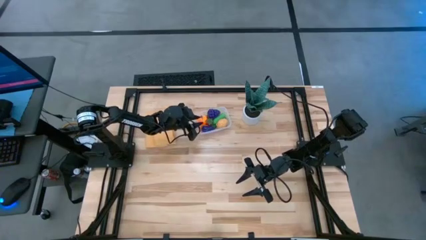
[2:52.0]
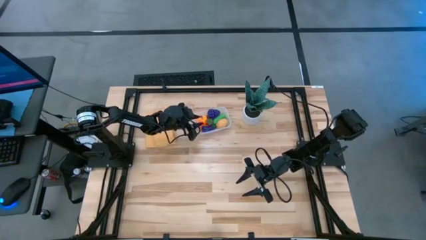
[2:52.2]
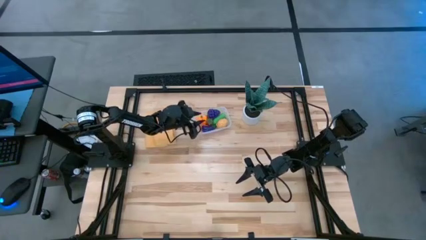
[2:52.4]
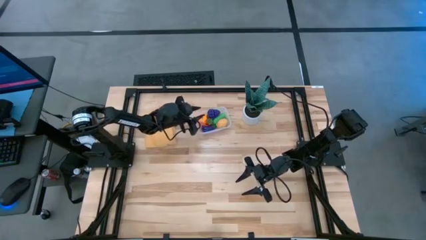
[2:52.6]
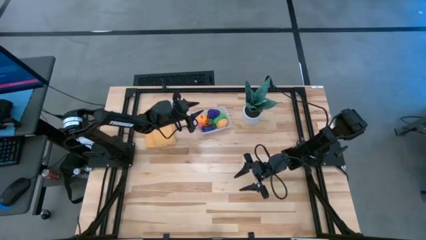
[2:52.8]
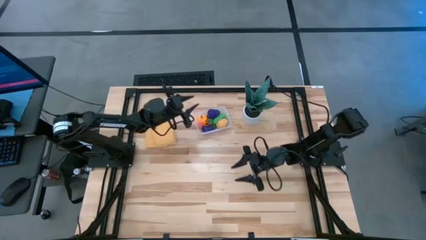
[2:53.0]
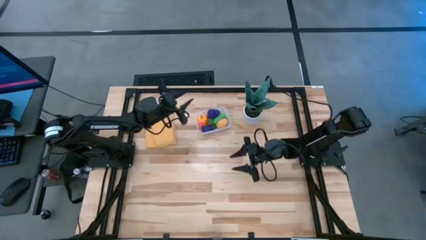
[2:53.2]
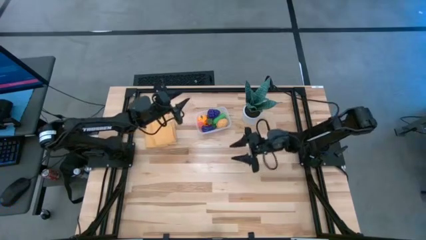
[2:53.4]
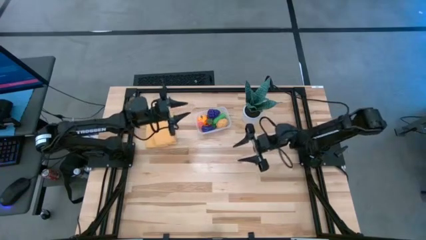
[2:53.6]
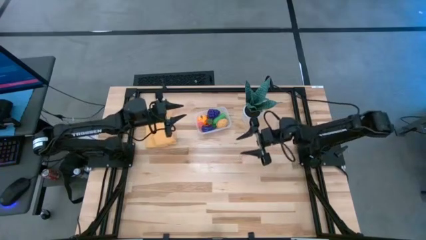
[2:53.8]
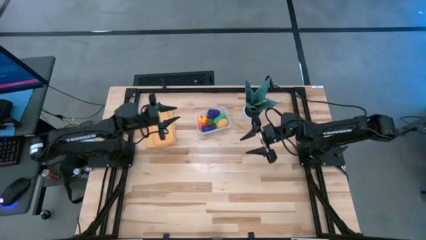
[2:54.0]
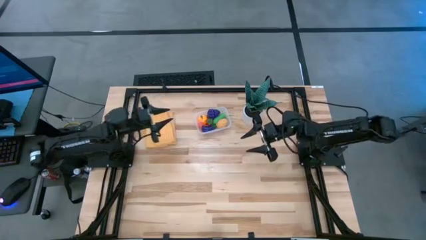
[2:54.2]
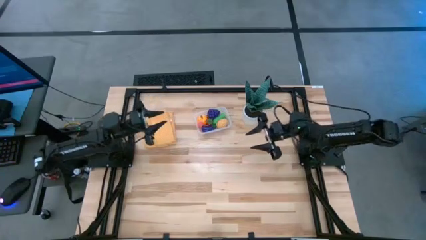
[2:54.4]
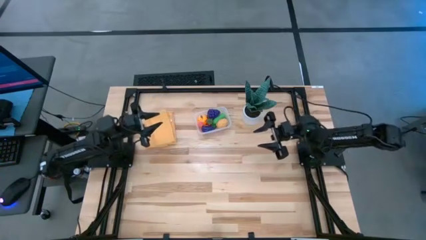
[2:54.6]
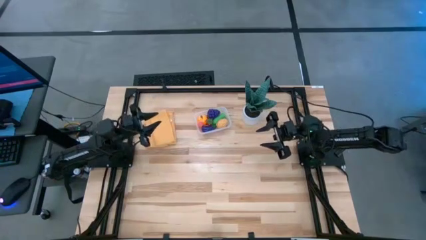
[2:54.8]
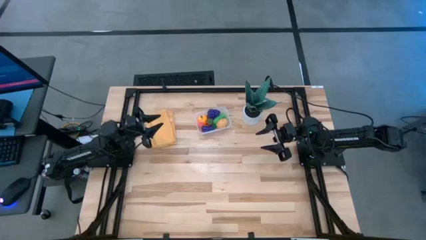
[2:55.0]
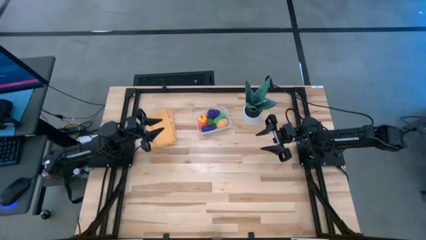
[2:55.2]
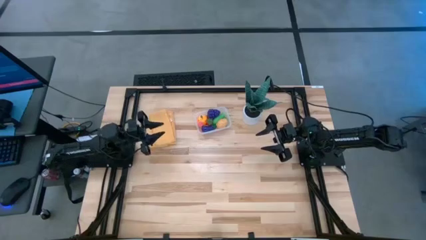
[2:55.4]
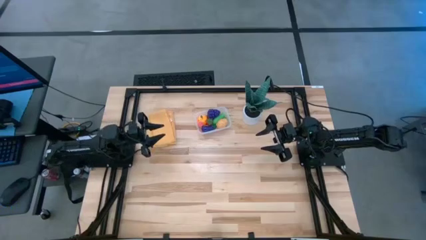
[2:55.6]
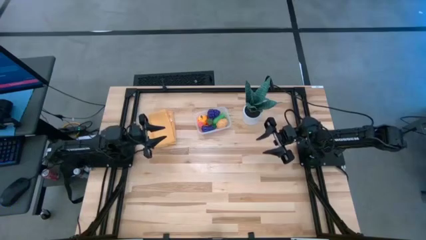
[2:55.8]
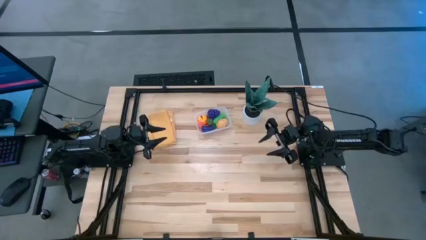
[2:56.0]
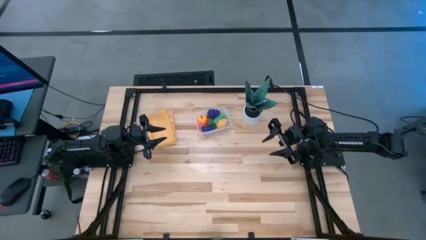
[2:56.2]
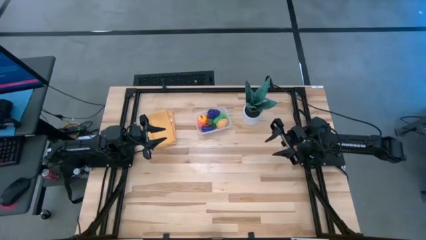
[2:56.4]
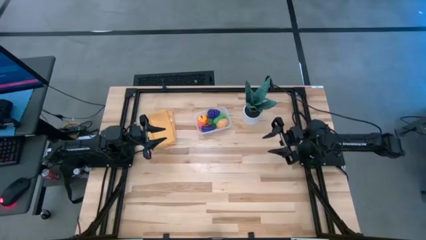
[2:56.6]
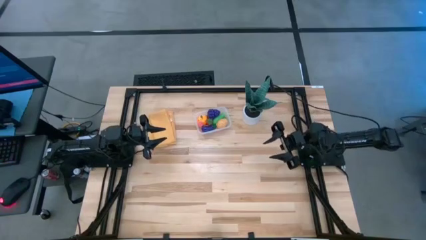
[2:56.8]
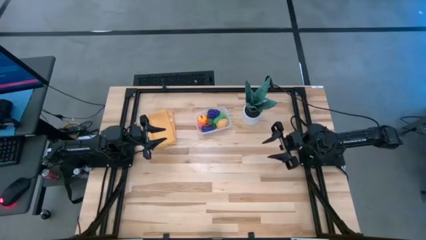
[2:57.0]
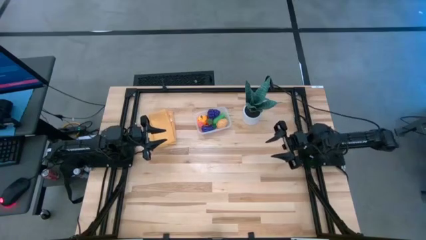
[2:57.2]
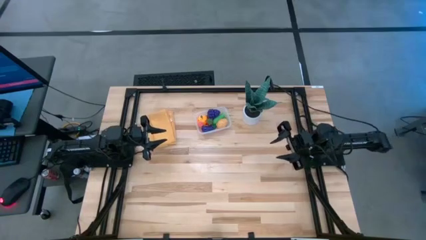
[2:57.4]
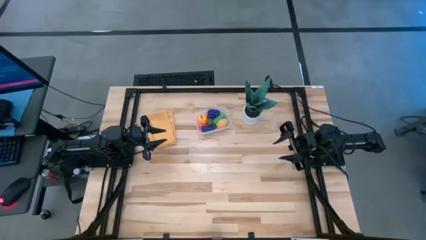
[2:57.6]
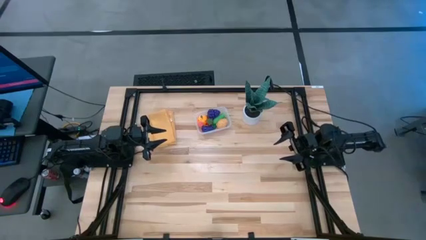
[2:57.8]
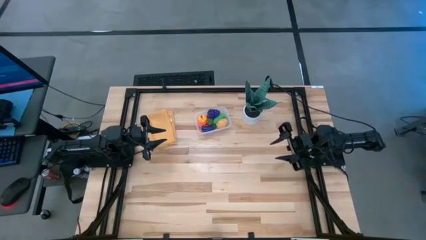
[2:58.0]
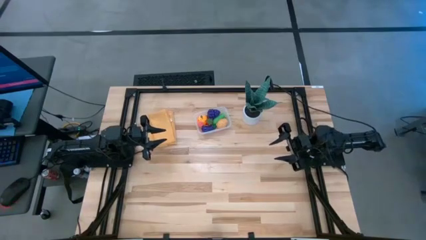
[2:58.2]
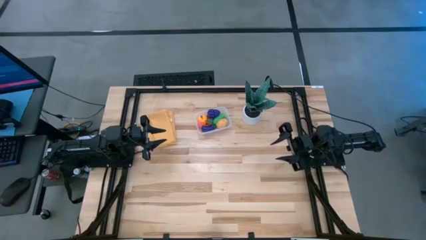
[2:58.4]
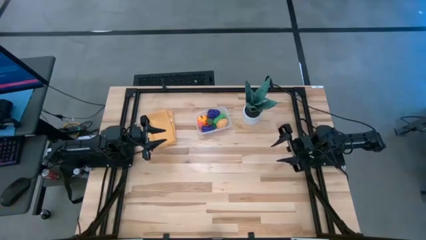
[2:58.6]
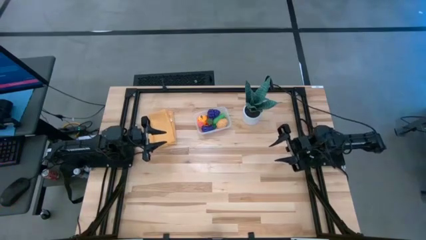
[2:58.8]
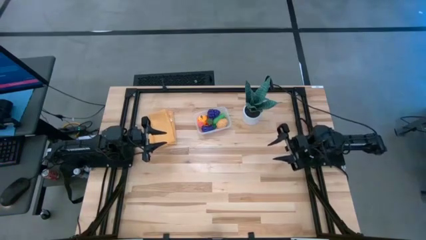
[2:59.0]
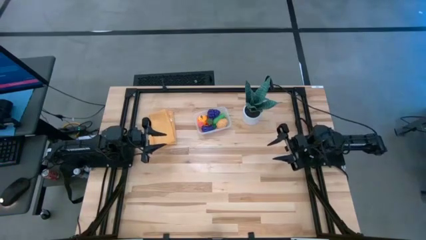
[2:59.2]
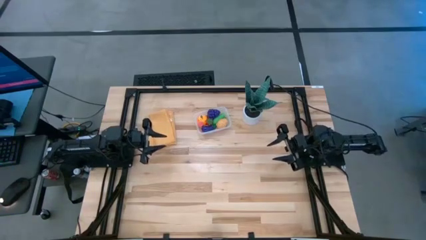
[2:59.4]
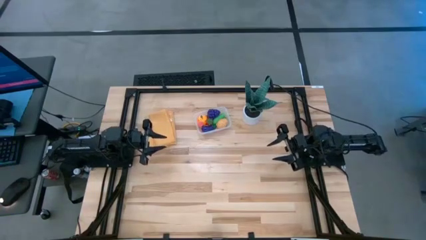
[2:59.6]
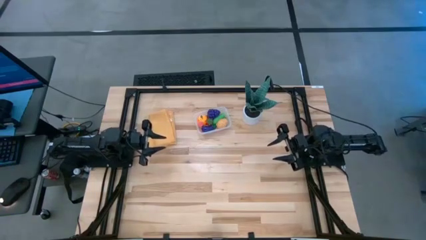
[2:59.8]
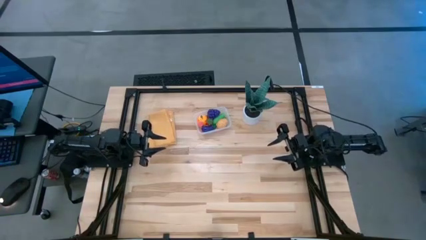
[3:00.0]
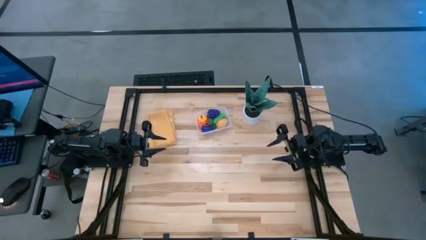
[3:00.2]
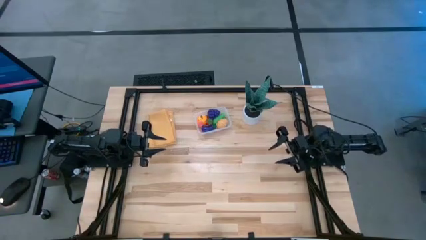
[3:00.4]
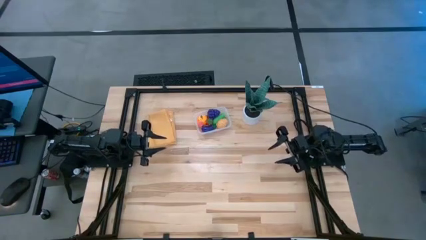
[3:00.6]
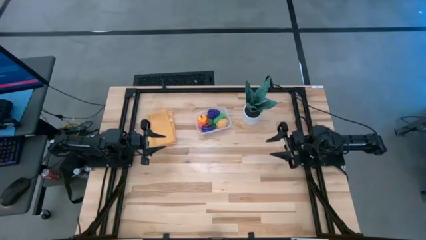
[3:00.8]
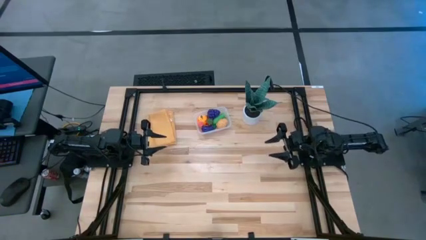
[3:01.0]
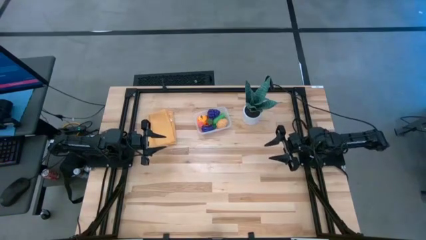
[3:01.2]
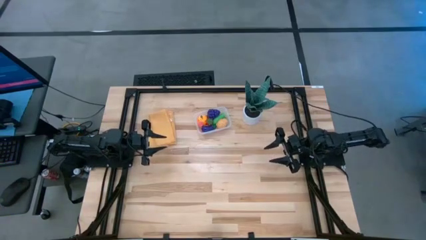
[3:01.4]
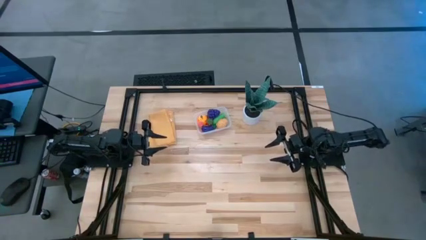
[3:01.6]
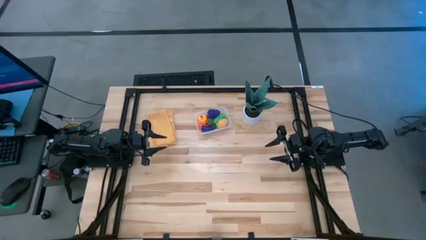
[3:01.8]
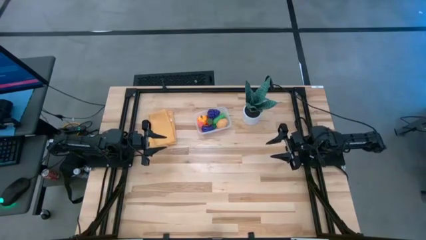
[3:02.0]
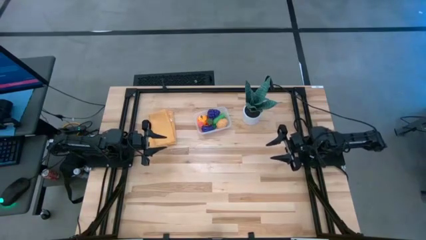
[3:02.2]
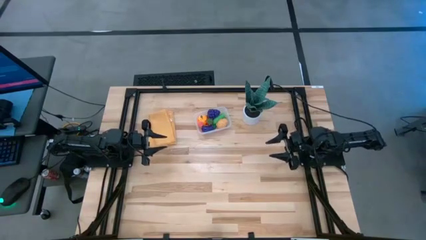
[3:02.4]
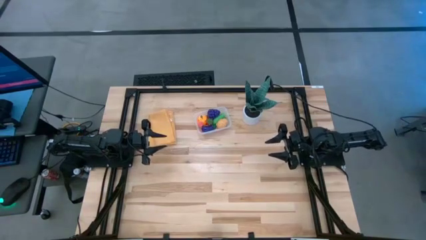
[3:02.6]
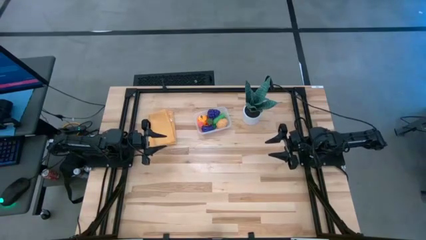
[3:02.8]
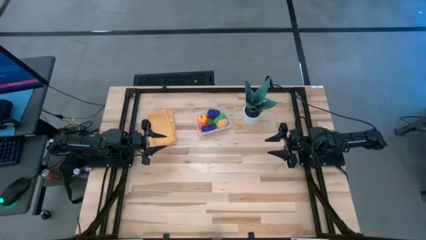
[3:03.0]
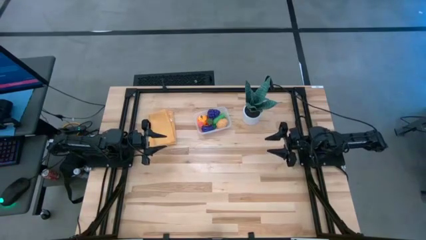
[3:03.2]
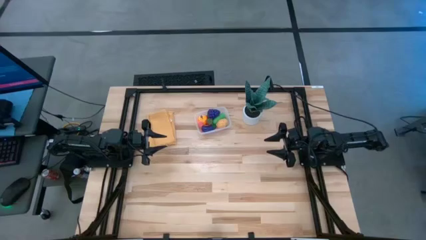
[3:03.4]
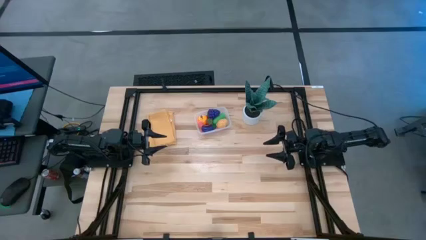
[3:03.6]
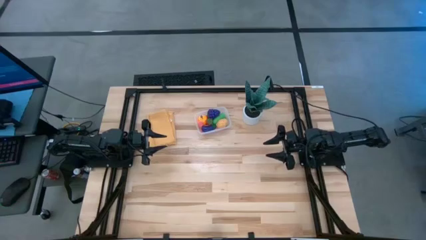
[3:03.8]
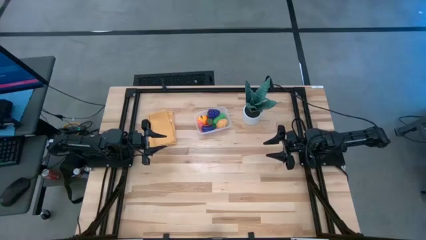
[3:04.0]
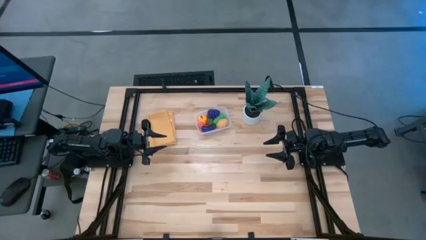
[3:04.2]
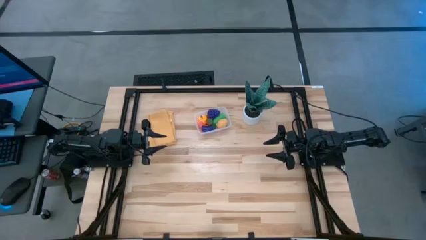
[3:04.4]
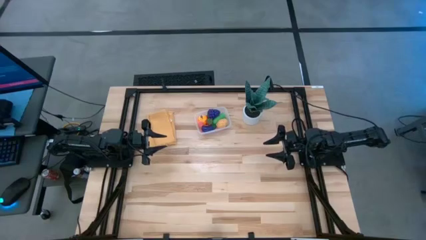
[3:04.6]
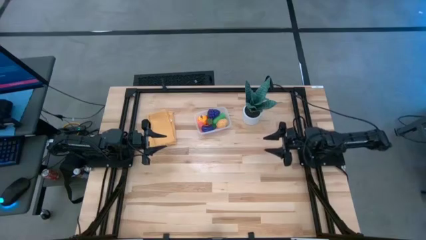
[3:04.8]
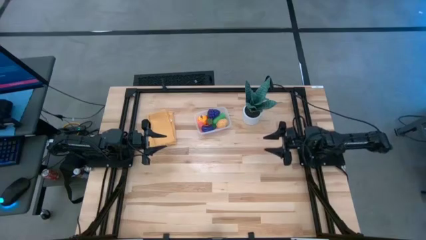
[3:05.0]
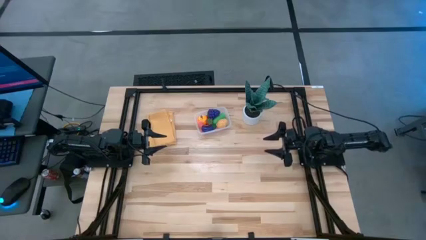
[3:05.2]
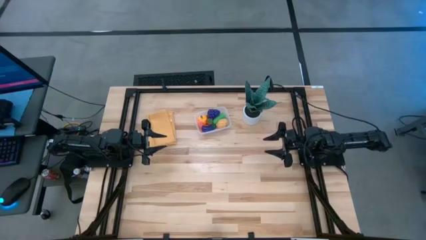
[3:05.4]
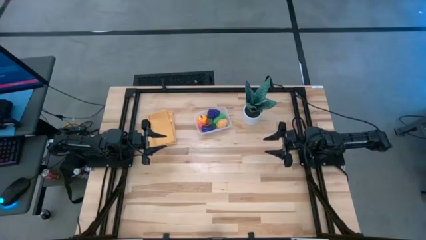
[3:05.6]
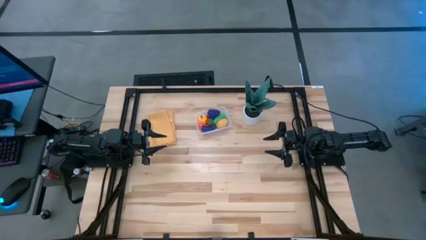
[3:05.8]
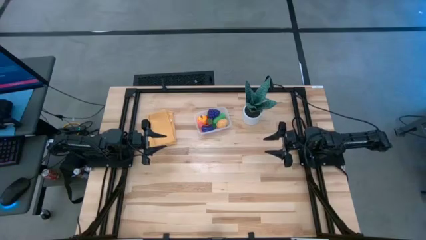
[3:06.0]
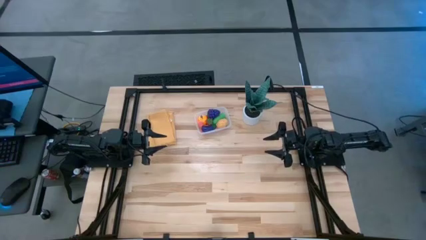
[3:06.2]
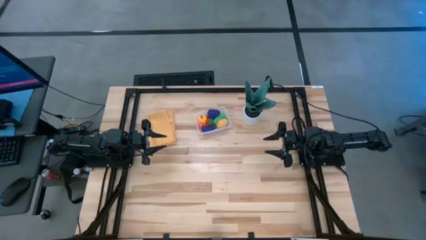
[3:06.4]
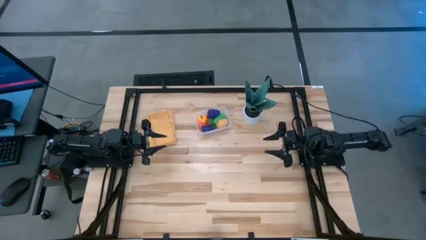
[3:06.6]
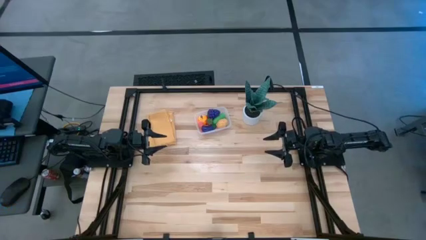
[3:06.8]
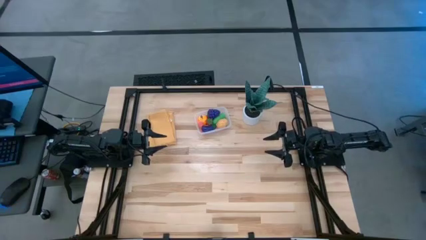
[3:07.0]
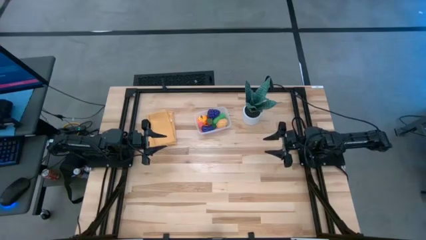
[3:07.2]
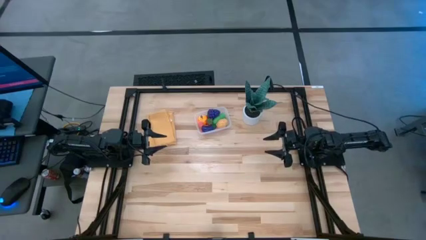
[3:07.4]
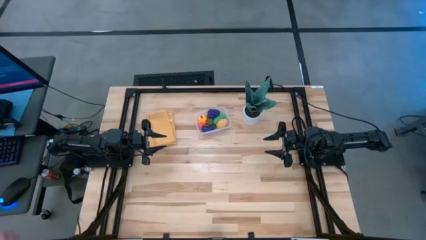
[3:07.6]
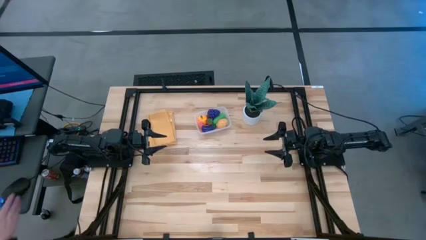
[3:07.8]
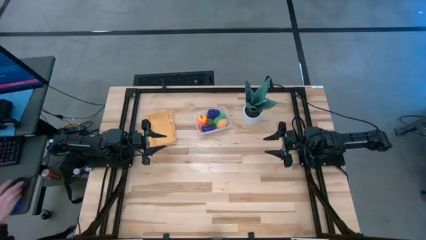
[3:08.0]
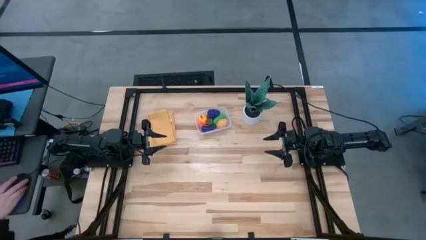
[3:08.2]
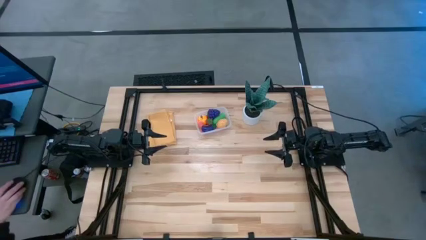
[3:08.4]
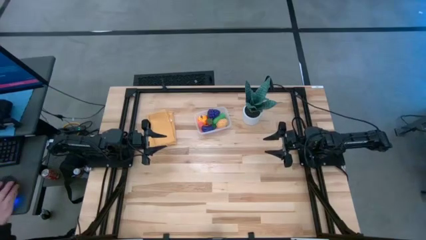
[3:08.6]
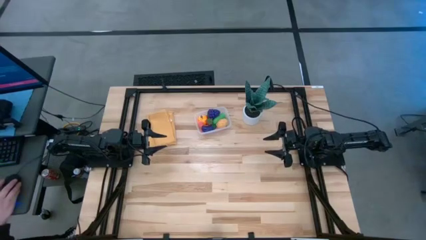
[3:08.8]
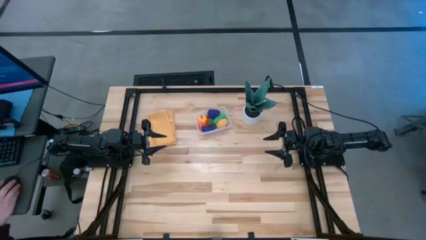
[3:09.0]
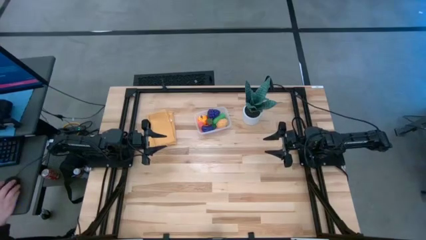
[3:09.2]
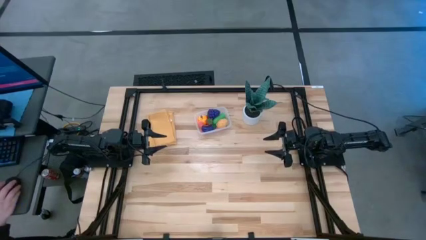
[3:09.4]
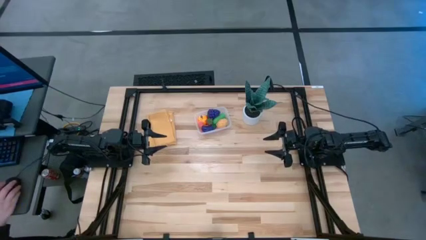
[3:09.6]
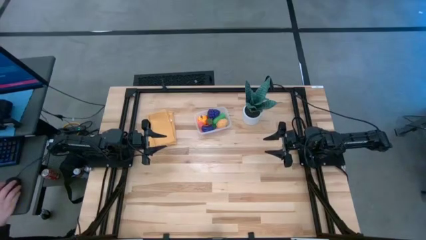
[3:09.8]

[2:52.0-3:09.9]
Task: Pick and placing Produce into tupperware
Return to Home Position
